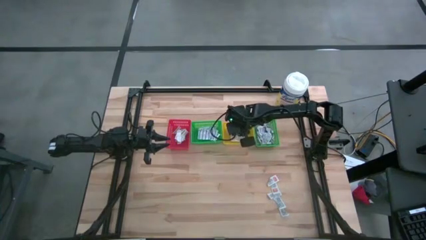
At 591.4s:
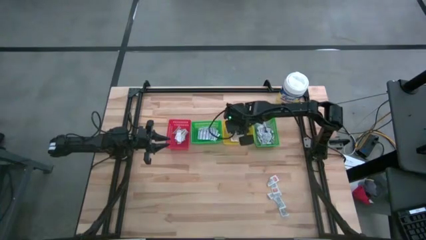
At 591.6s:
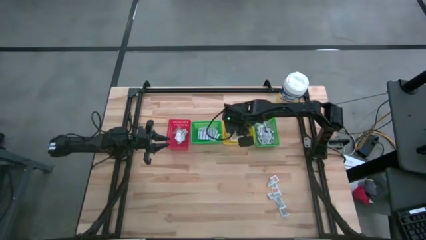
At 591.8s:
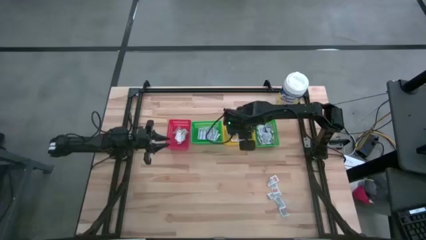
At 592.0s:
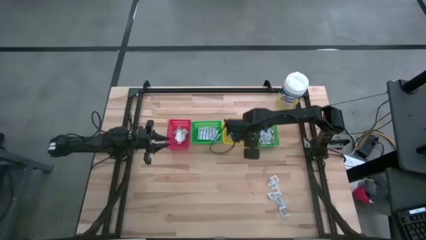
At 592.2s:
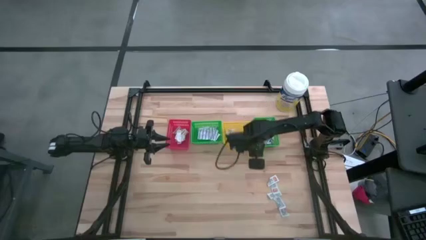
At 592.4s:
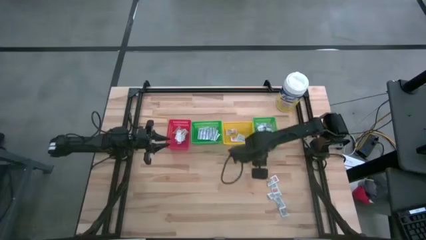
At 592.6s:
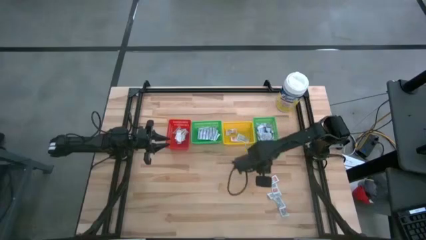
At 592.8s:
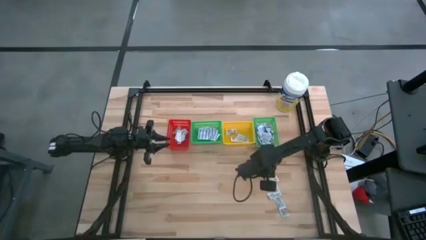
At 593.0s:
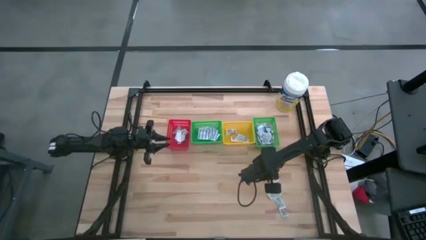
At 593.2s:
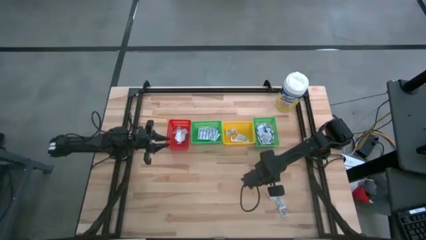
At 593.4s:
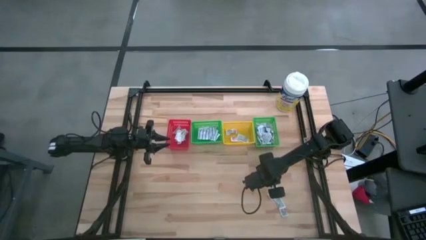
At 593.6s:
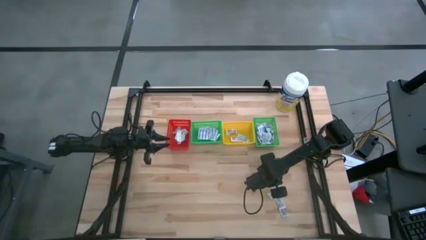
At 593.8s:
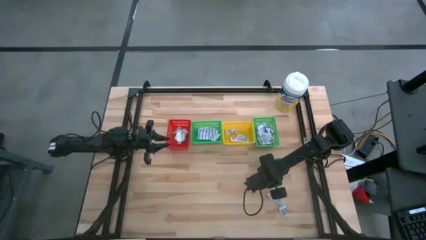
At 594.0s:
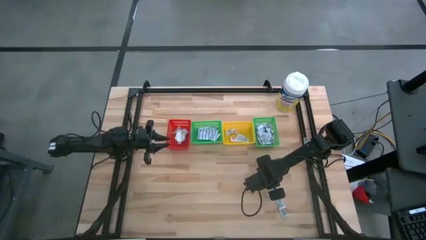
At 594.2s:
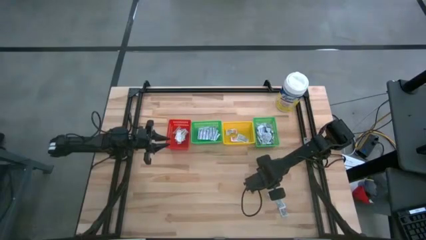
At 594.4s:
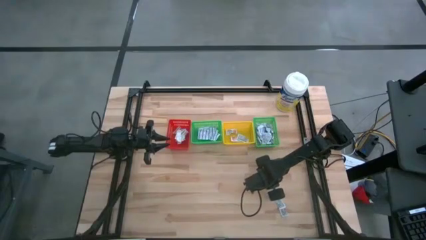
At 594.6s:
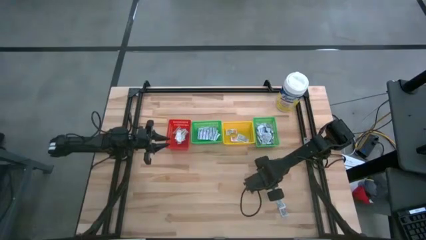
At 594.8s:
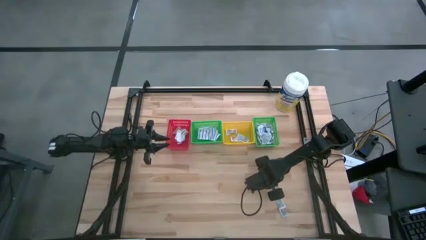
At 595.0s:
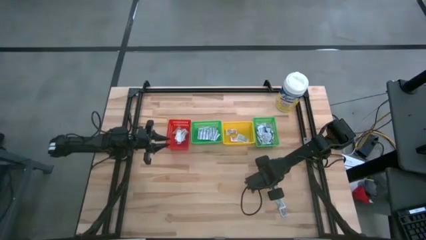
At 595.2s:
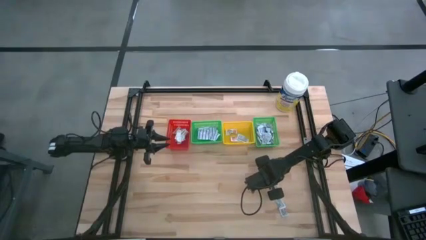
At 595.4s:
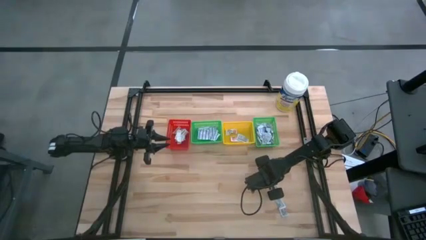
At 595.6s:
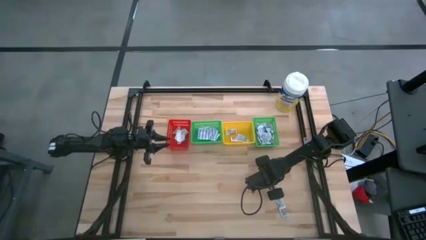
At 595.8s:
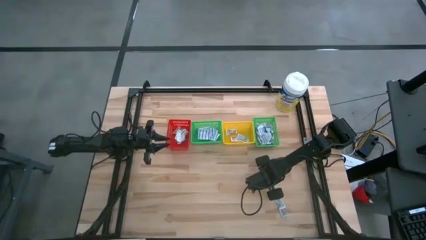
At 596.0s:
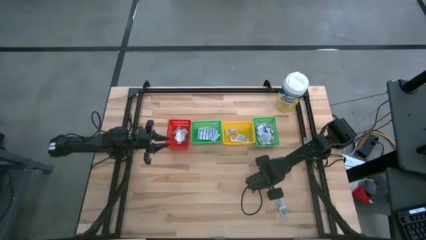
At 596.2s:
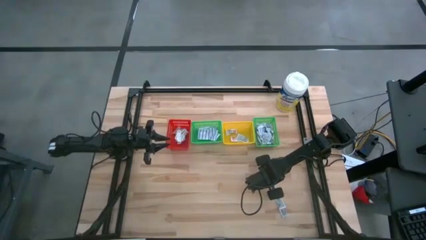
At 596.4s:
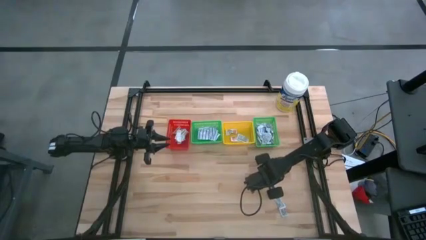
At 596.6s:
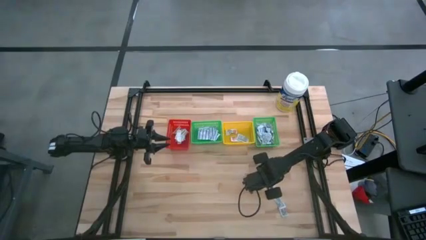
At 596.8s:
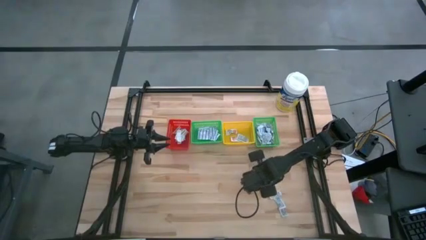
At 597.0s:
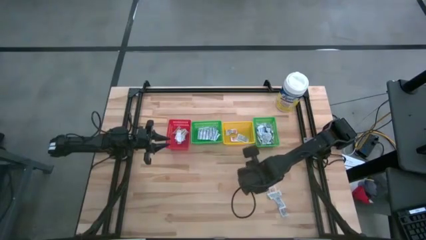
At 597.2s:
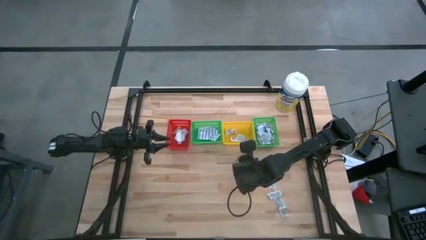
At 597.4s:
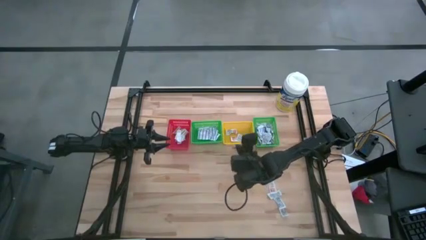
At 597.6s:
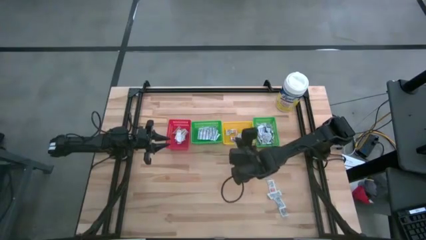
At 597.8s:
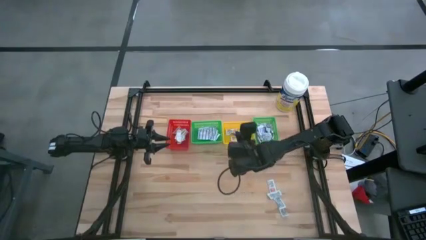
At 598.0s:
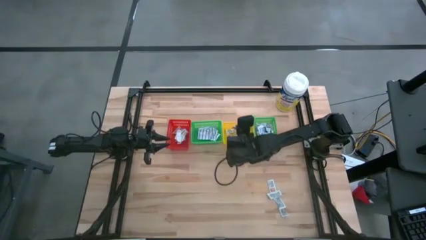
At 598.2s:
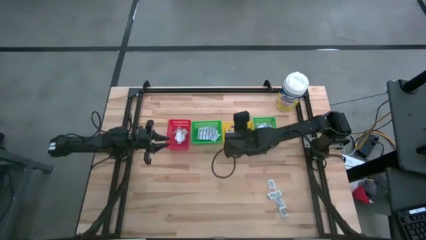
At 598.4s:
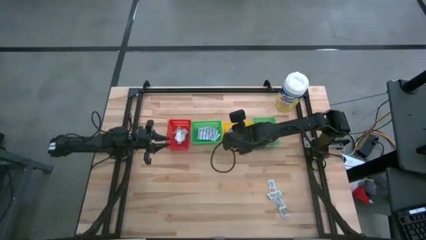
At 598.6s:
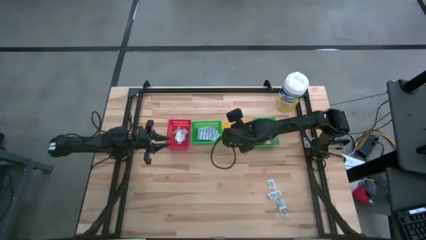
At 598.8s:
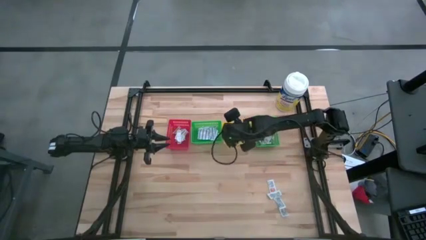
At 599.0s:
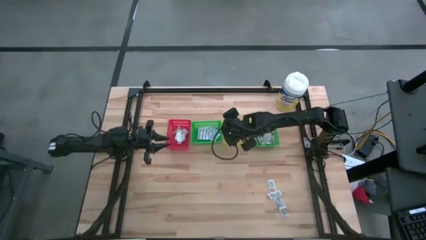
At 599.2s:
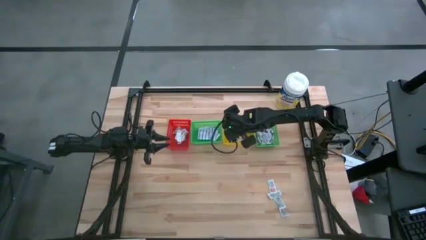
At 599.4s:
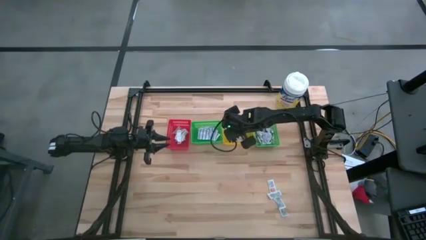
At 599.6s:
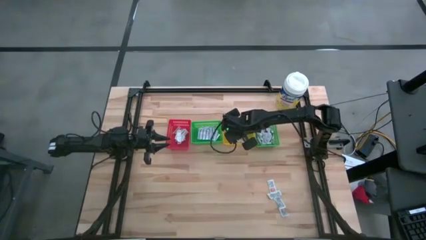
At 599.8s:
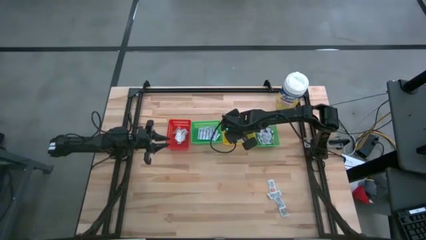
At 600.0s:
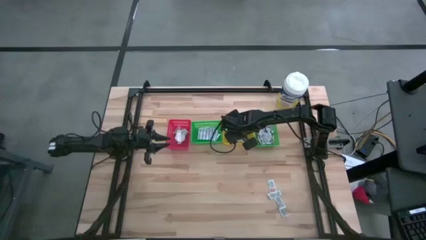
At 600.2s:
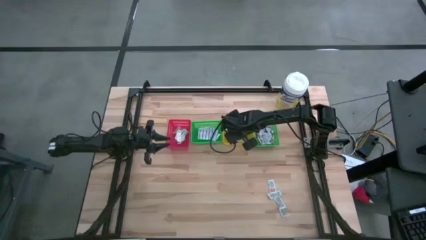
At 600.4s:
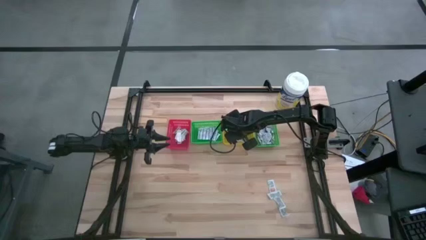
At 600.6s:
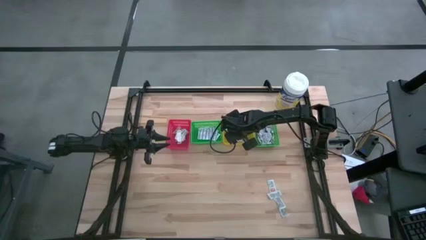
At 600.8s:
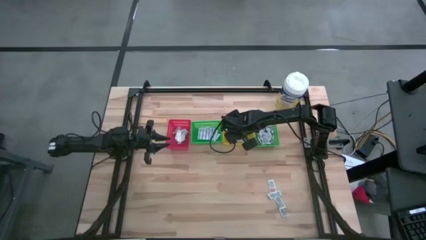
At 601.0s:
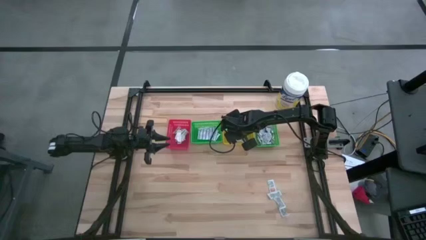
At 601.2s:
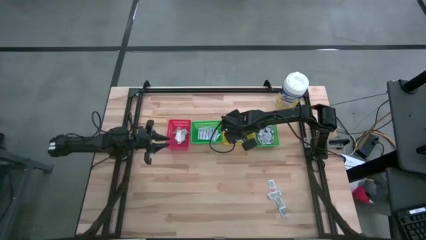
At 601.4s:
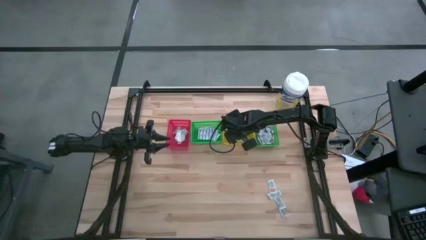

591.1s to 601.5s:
Task: Pick & Place First Aid Supplies
Put the orange ointment pack into the yellow bin
